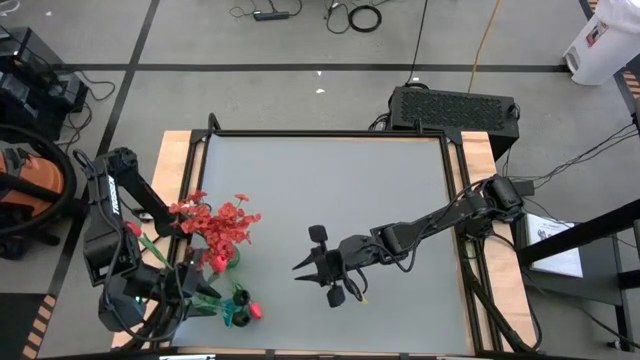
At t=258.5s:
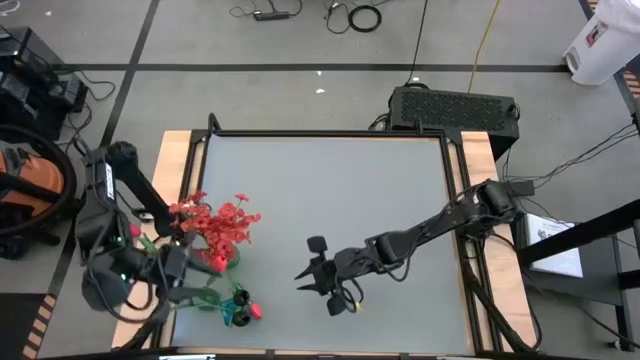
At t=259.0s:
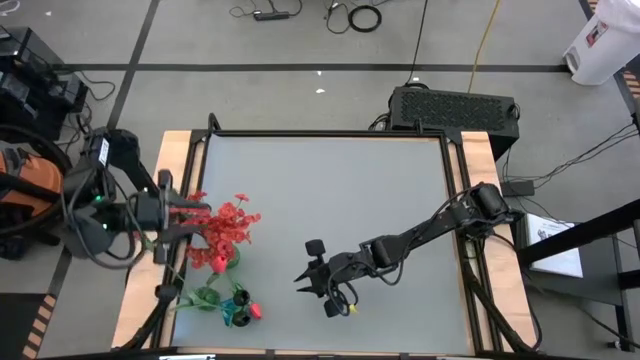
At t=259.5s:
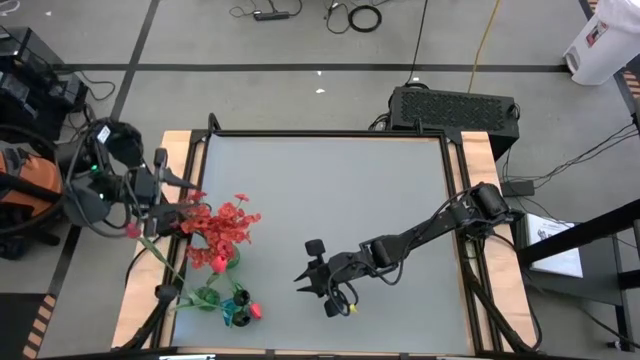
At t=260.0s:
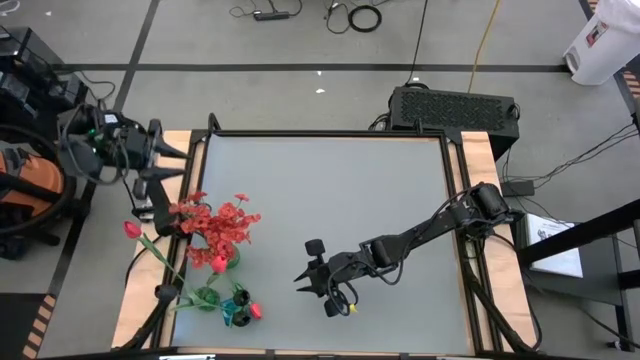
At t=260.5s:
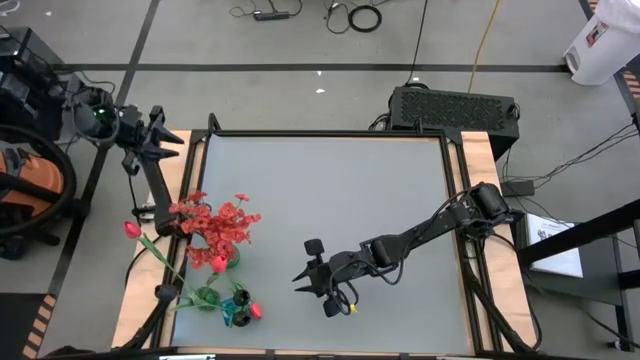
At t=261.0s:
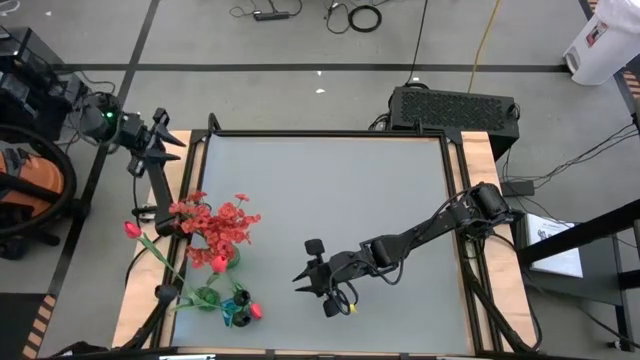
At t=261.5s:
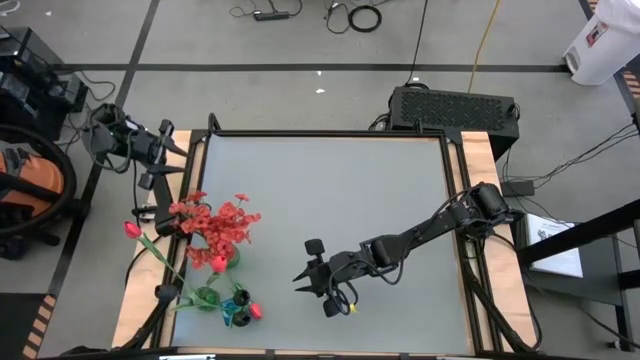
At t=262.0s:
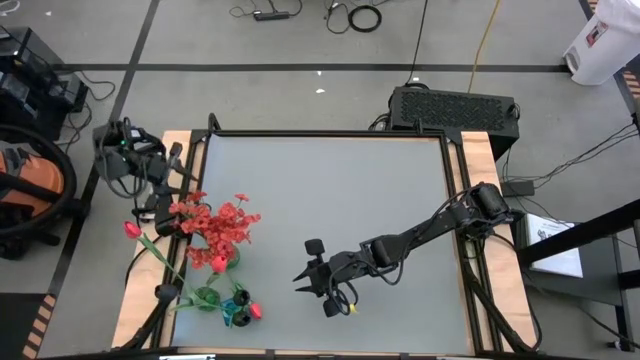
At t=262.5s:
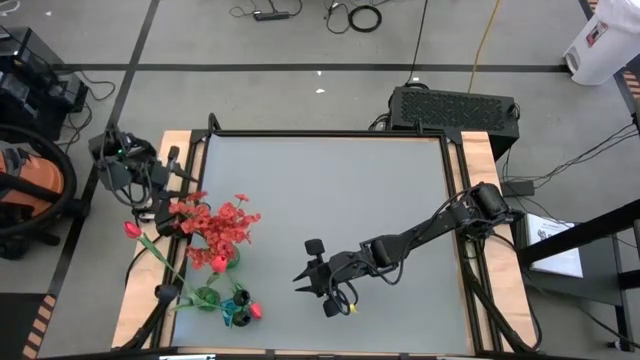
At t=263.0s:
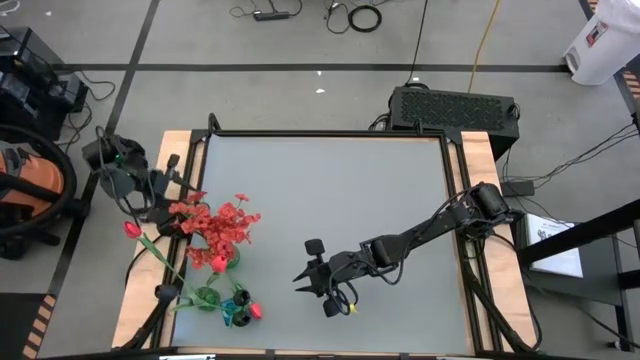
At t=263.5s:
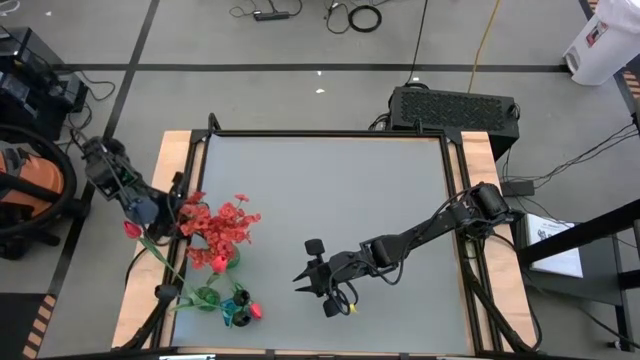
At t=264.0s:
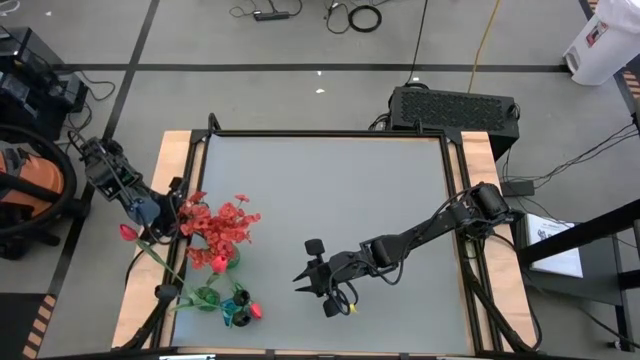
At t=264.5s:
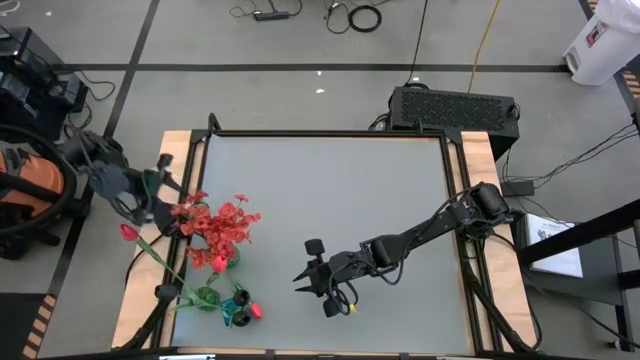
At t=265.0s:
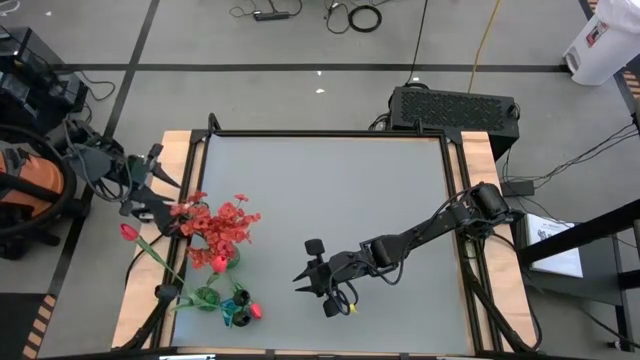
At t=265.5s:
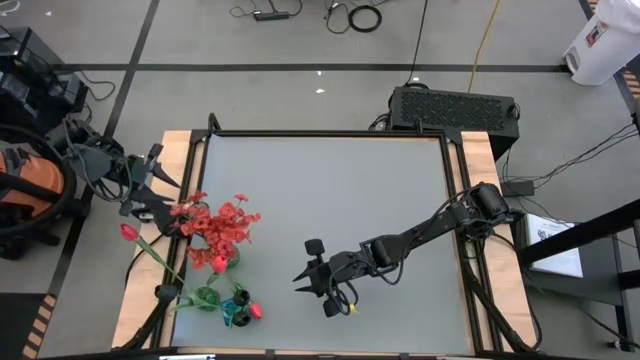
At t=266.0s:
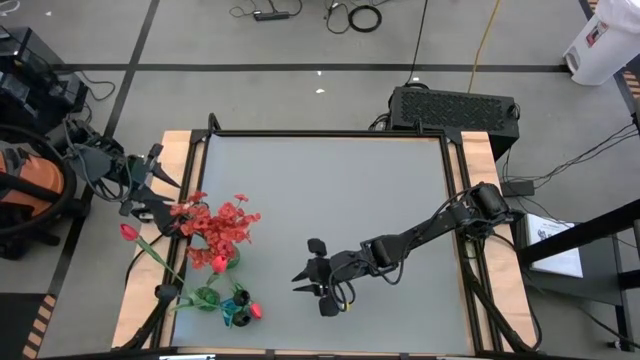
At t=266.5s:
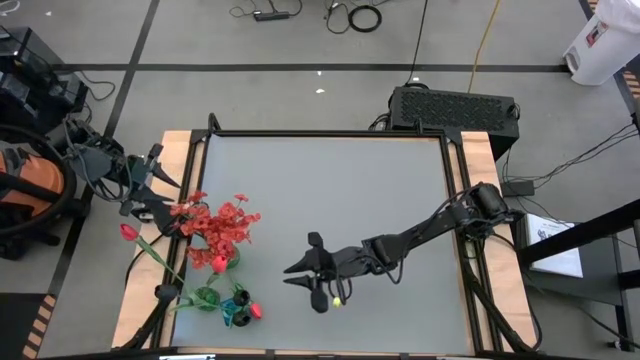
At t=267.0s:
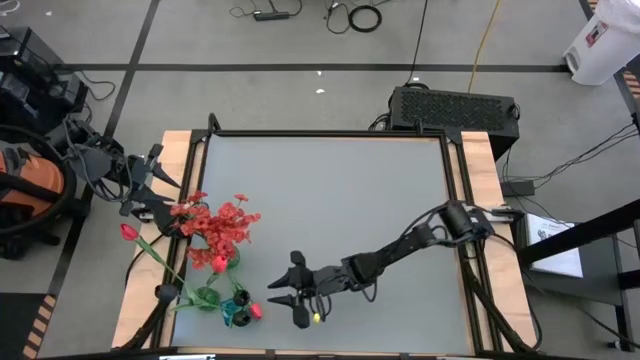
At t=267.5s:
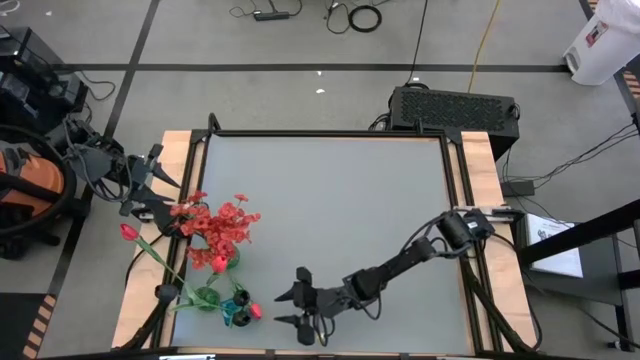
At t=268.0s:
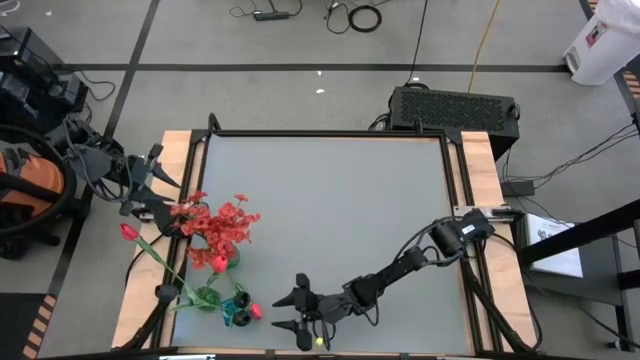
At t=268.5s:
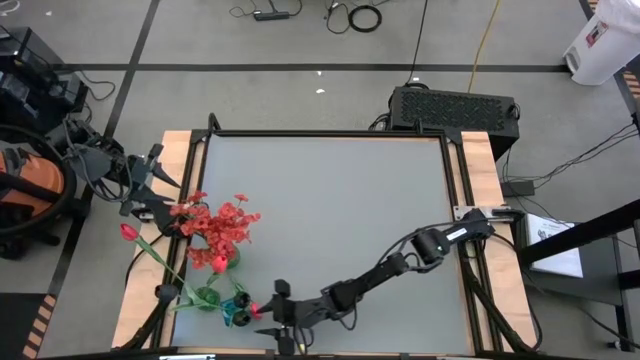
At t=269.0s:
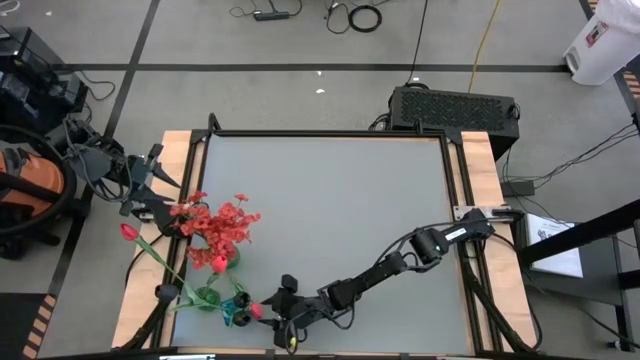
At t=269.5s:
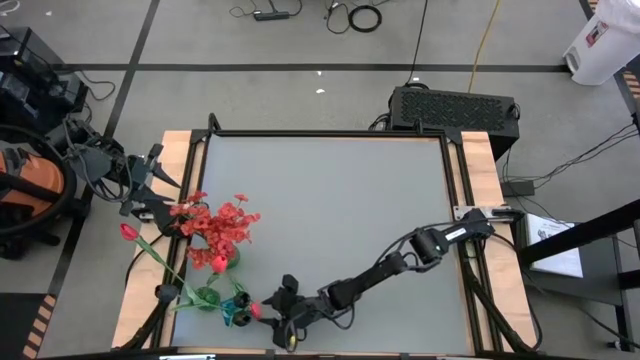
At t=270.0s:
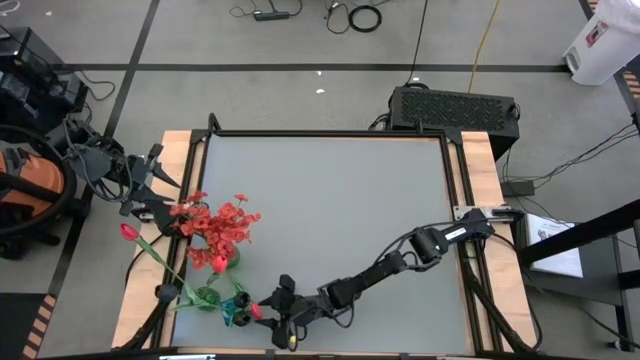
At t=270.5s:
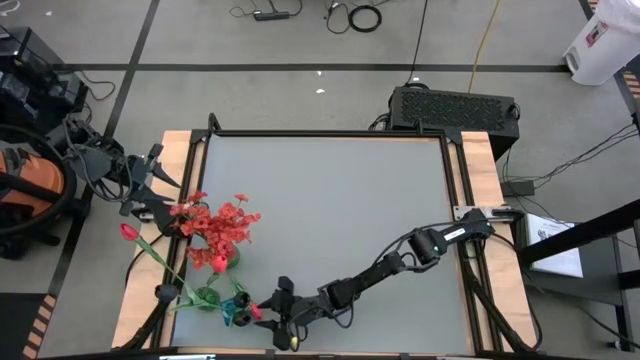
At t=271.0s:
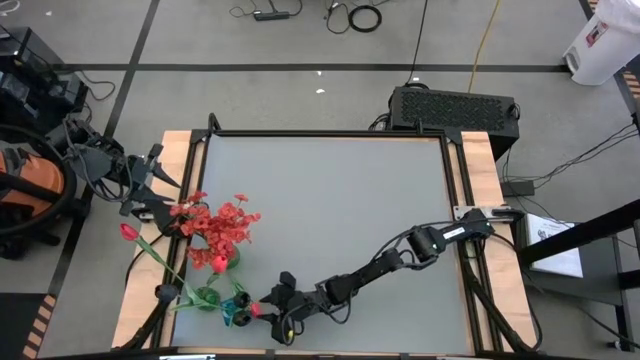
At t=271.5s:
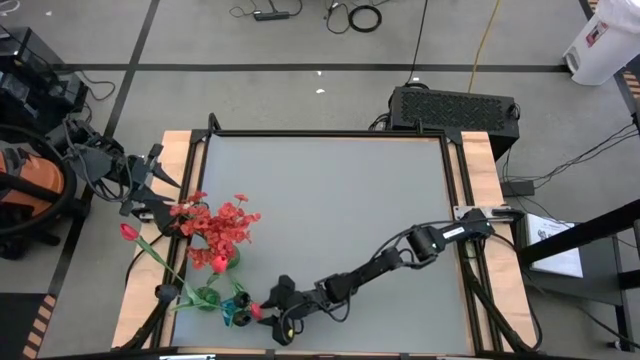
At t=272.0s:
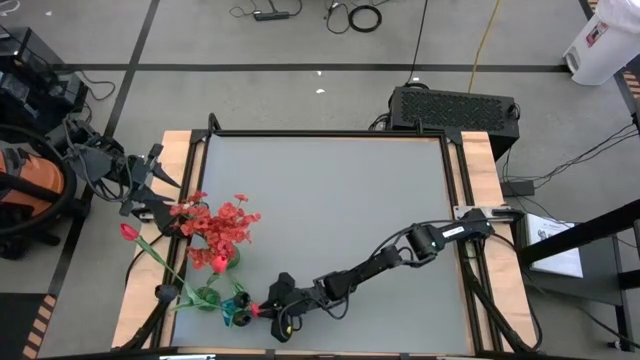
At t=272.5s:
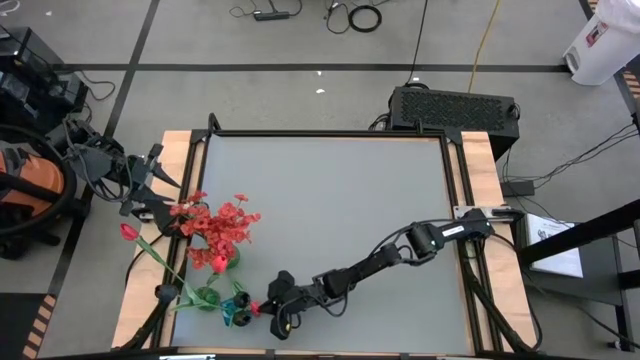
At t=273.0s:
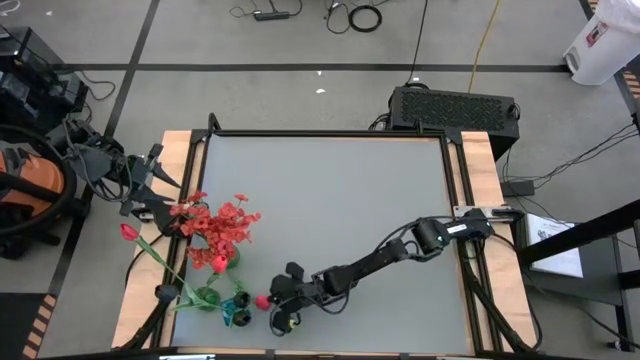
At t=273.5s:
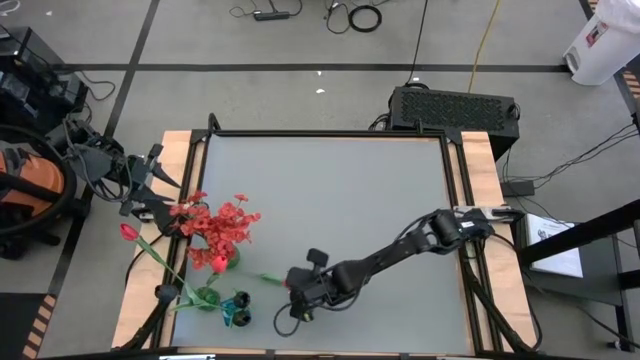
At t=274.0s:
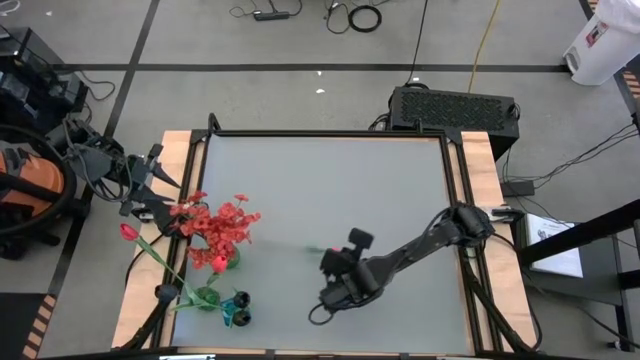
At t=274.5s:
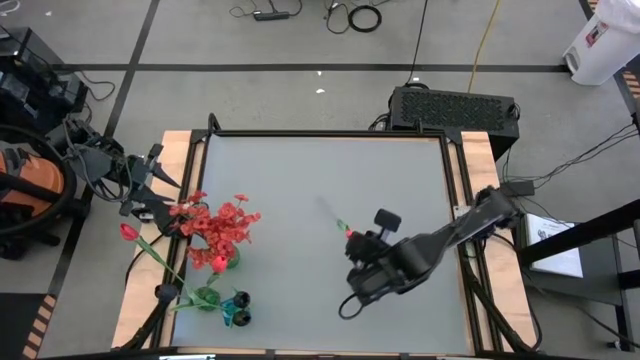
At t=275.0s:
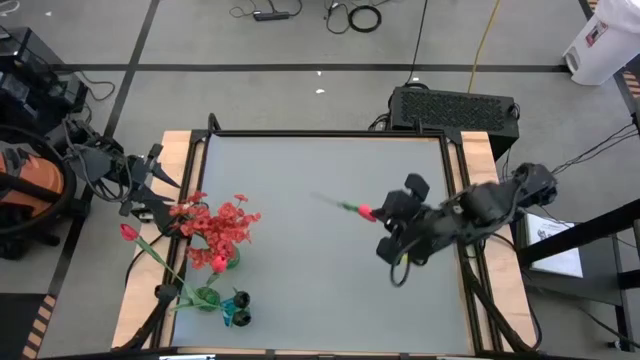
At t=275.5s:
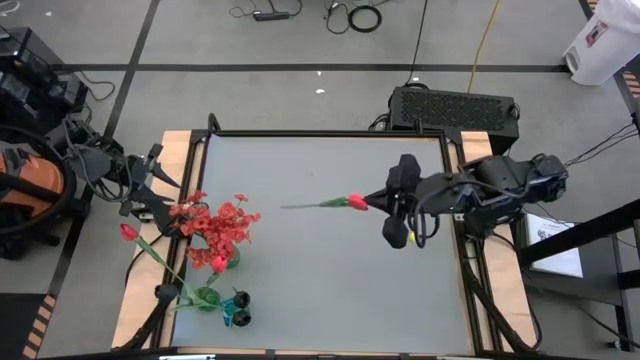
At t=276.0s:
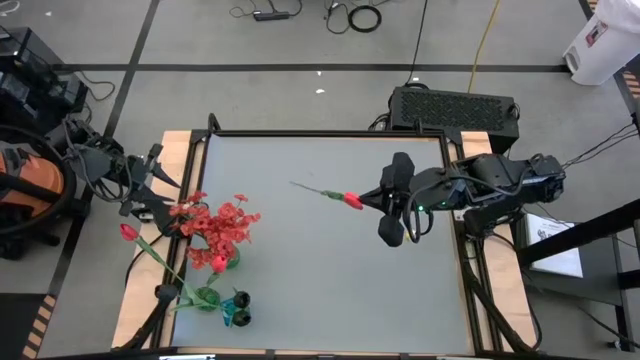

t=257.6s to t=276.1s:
Task: Sort flowers into vase by color
Put the light orange flower into the bottom green vase

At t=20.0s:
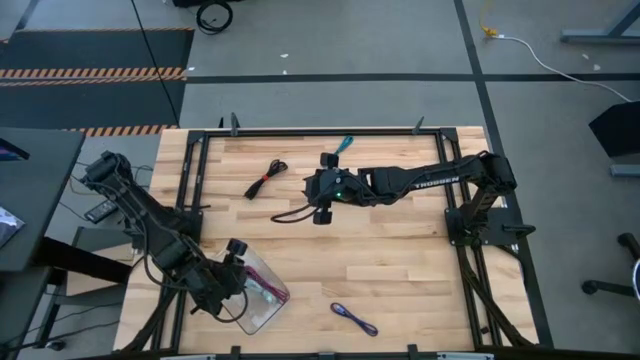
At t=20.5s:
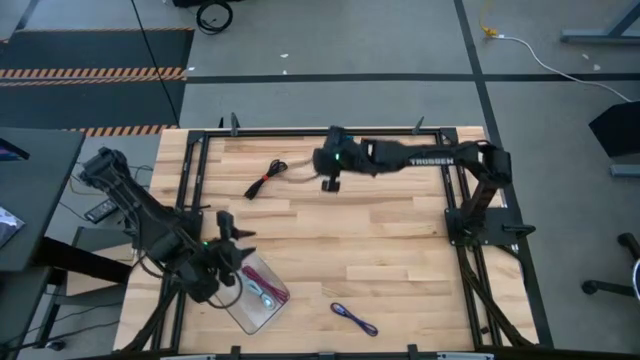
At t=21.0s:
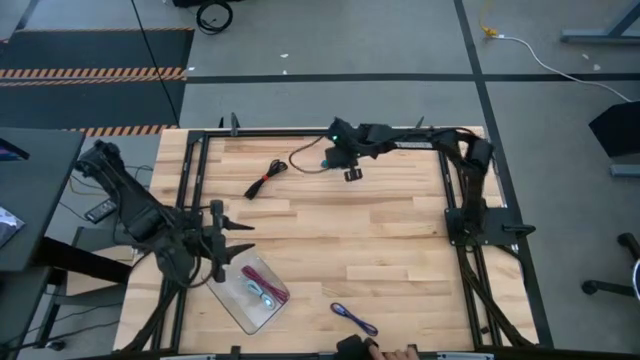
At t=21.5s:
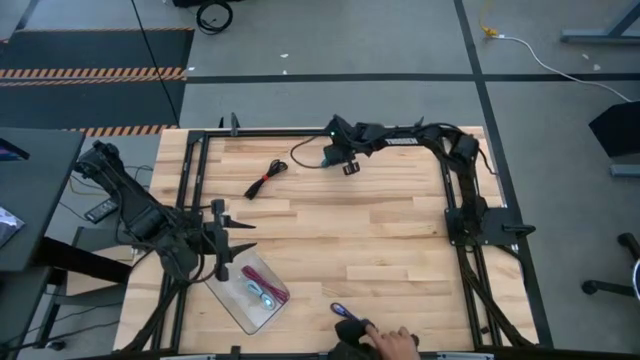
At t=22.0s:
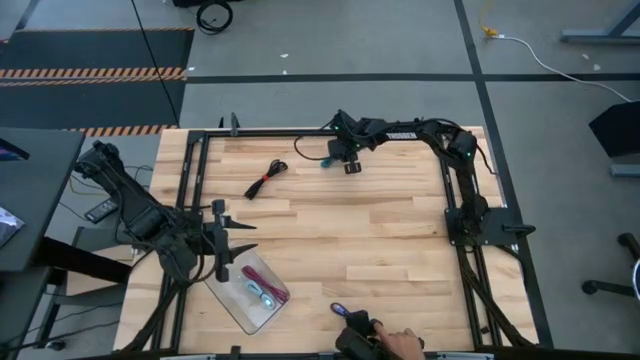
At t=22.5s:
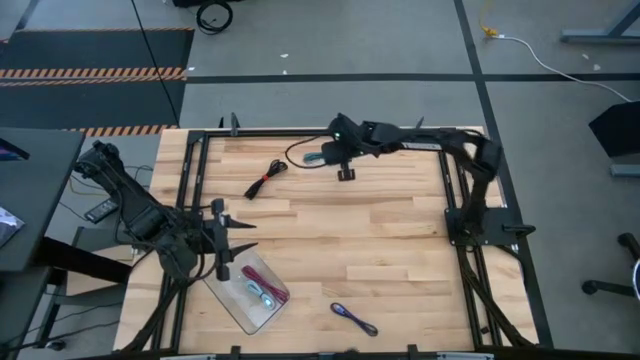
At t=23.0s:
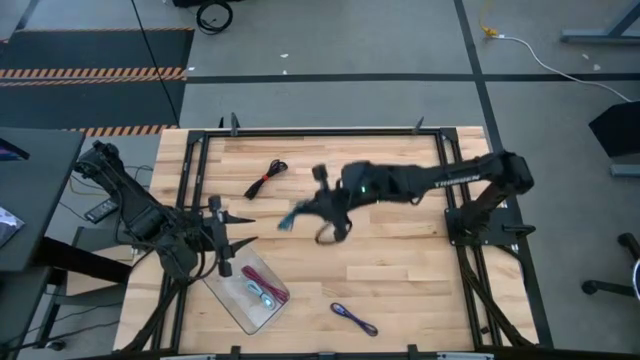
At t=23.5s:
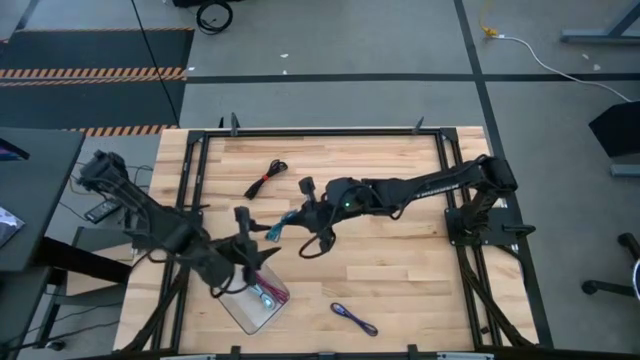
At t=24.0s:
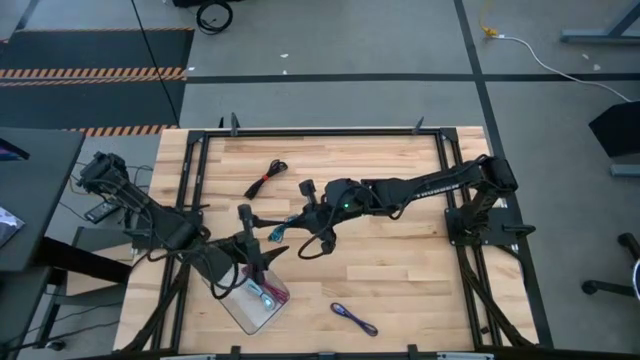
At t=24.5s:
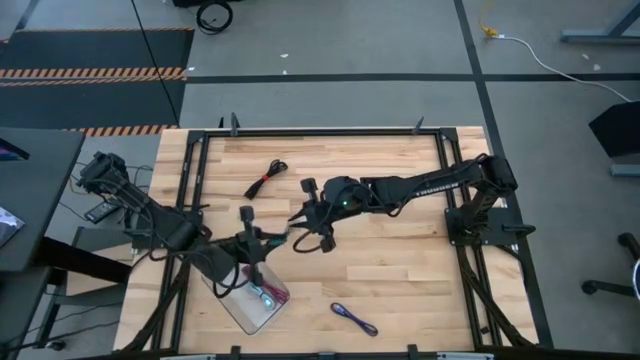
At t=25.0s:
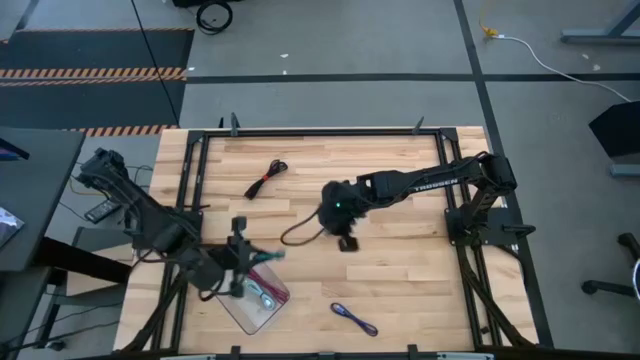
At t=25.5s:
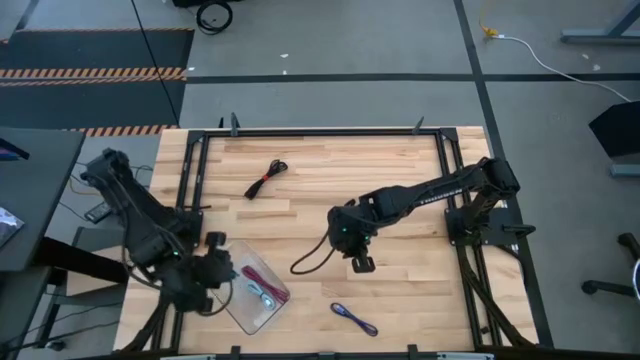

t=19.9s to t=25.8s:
Task: Pick and place USB-C Cables
Put the black blue charger cable into the transparent bin
